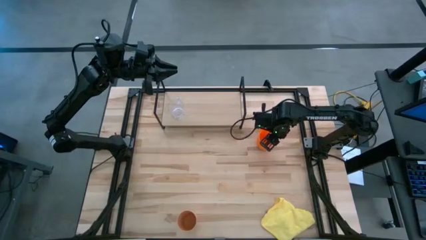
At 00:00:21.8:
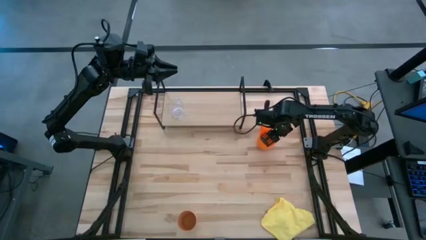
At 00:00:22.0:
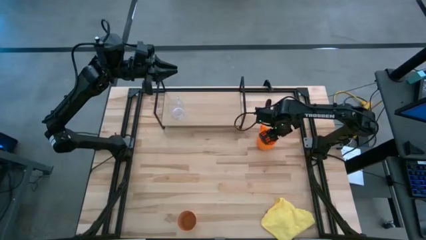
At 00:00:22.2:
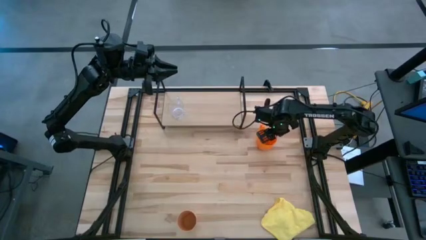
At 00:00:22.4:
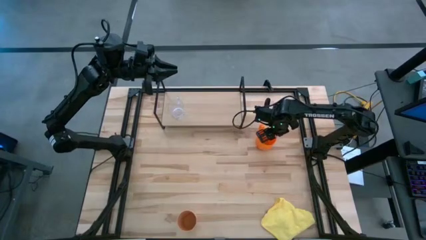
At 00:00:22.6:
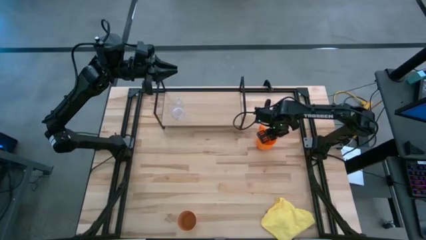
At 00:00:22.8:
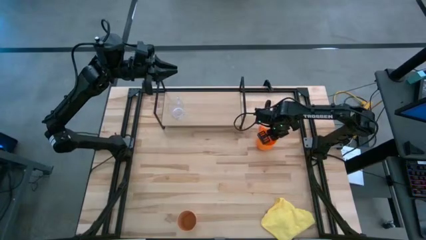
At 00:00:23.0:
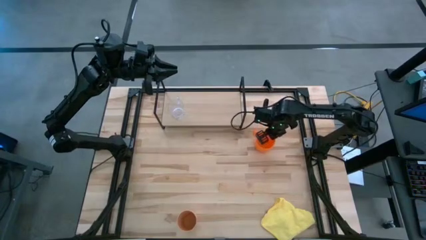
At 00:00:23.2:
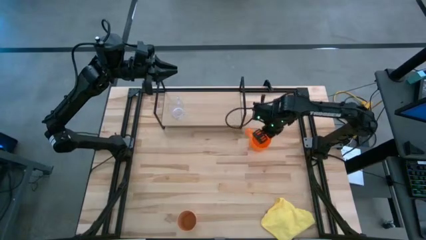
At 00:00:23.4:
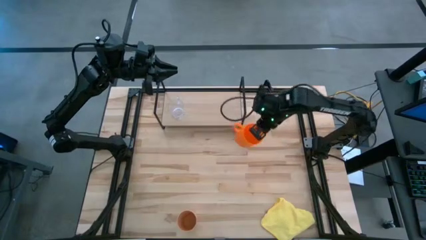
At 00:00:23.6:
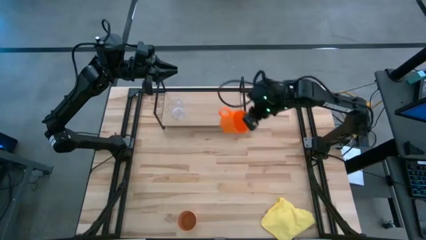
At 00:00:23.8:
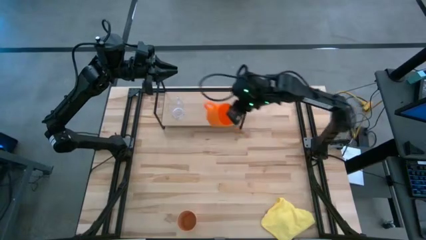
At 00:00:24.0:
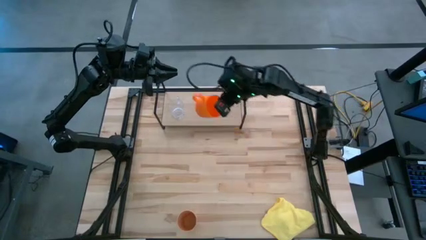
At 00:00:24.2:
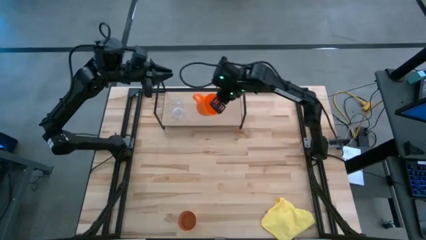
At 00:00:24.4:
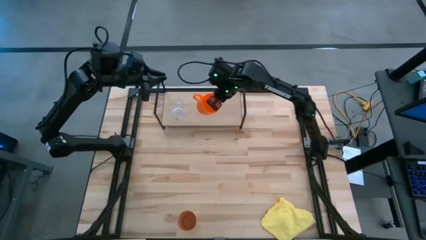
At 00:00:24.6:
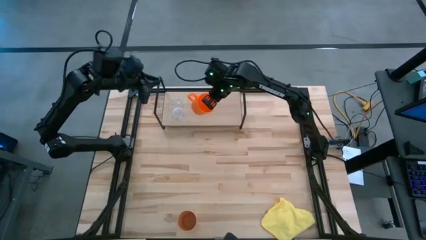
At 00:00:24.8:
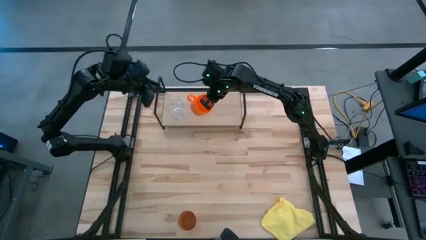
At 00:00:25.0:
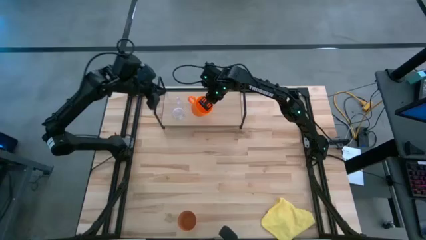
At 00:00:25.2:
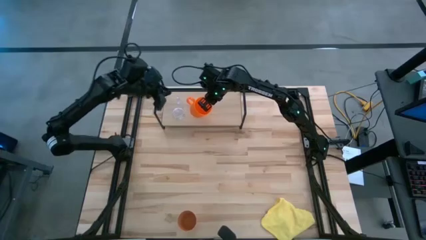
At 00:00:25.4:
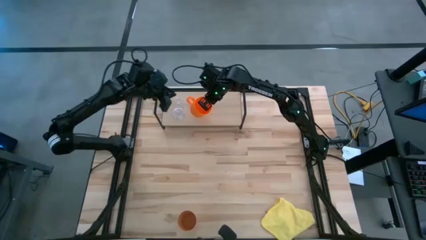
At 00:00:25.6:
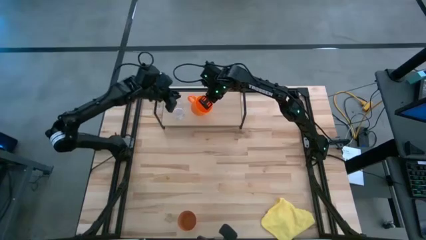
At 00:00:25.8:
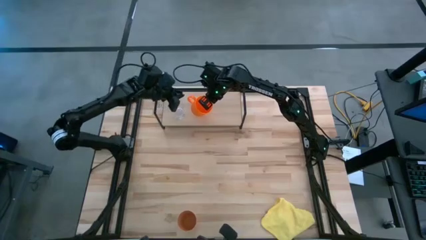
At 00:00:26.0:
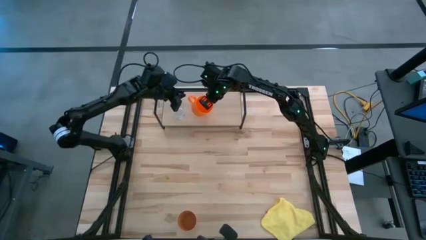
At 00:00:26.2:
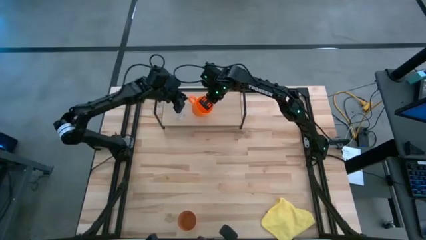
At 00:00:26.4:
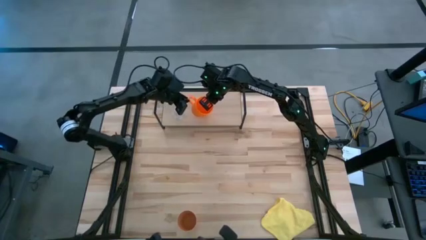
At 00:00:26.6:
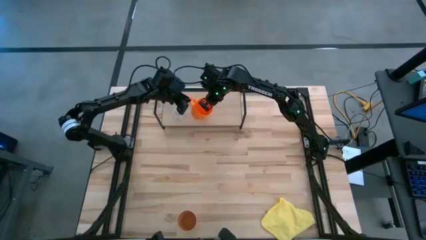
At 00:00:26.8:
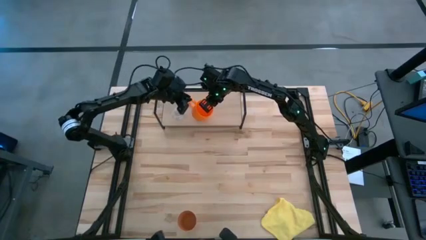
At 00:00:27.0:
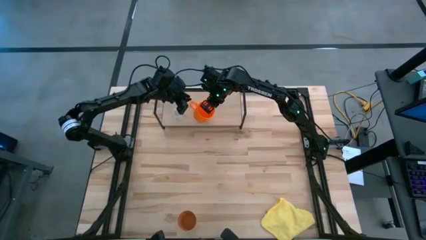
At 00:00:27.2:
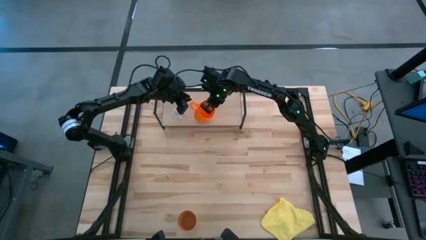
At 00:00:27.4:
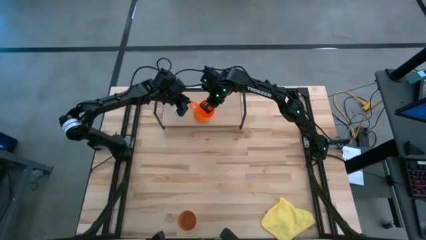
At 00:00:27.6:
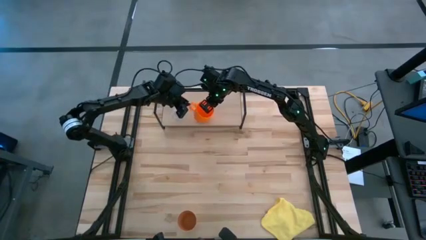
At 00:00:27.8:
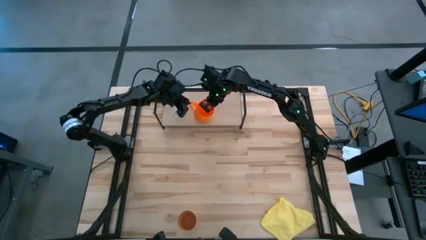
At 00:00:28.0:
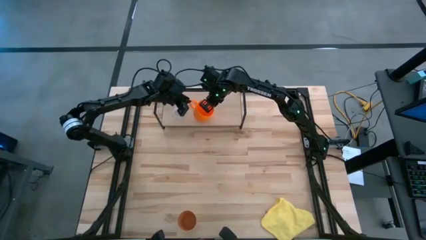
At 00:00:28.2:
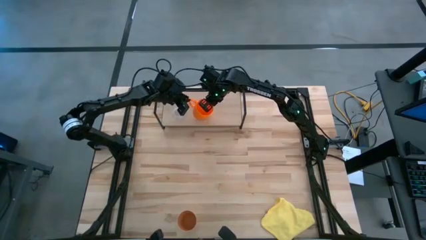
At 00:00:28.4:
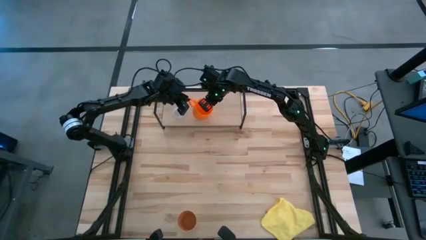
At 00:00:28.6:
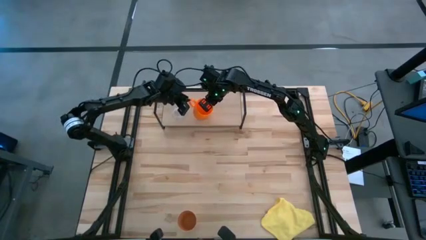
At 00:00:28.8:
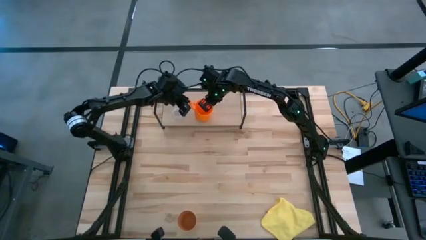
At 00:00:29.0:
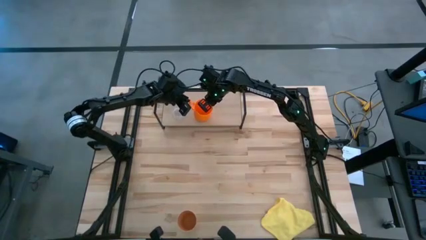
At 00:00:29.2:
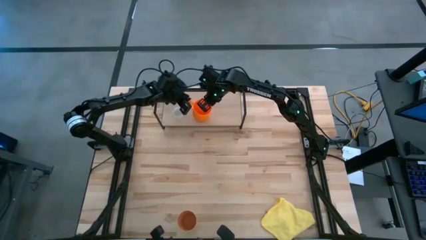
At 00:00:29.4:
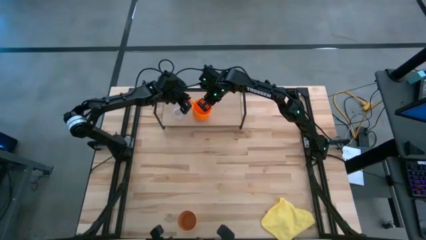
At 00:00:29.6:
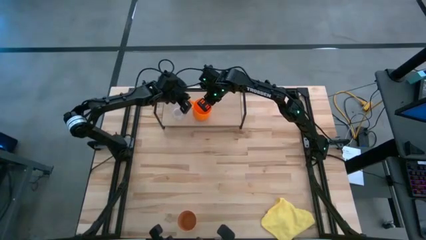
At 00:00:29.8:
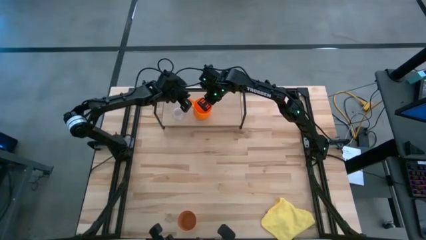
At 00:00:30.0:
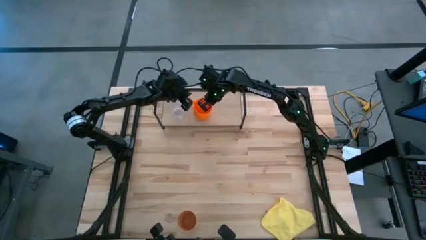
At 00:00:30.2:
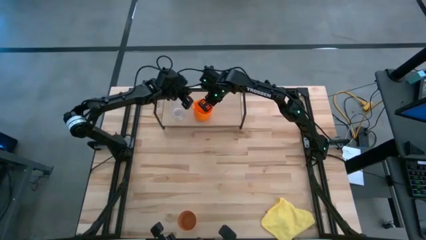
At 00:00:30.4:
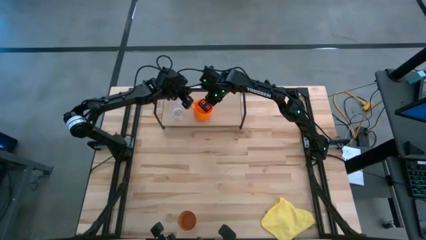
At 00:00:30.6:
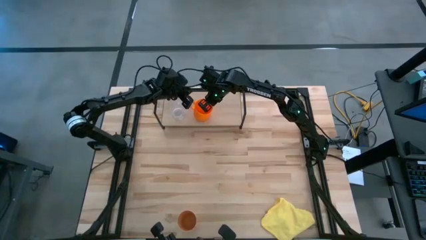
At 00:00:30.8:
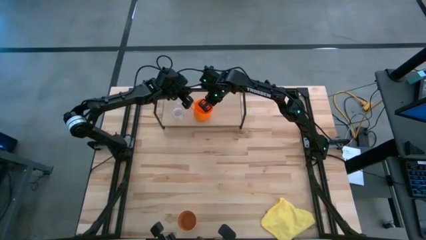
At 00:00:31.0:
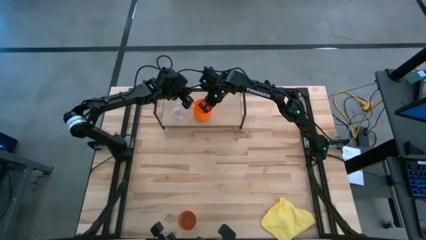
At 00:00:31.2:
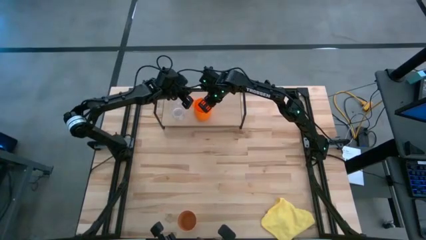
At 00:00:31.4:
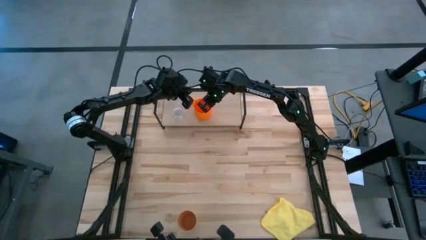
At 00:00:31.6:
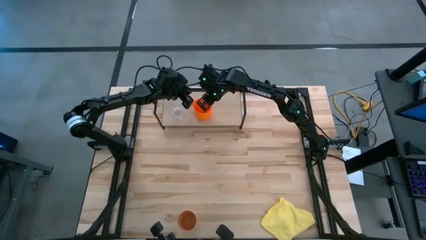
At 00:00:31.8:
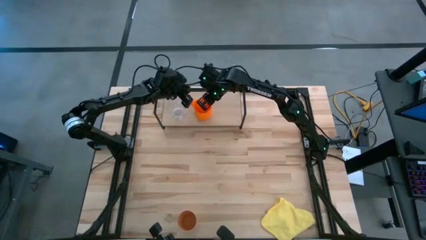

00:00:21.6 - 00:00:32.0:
Task: Stack small to large cups/mugs on shelf
Put the orange mug on the shelf

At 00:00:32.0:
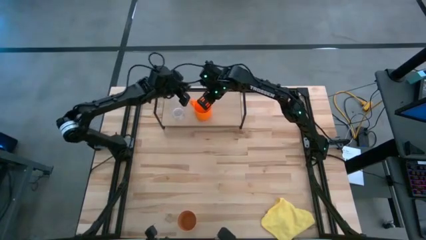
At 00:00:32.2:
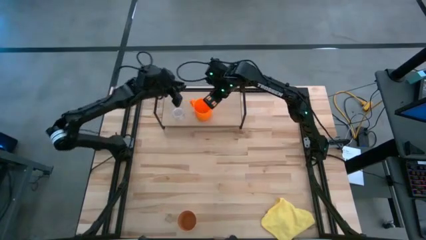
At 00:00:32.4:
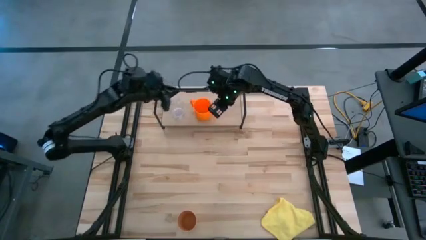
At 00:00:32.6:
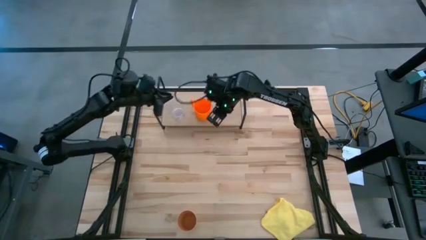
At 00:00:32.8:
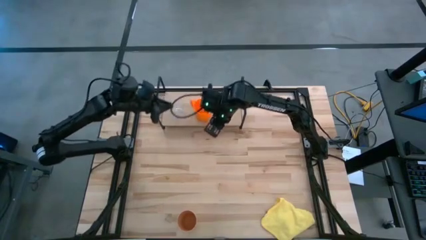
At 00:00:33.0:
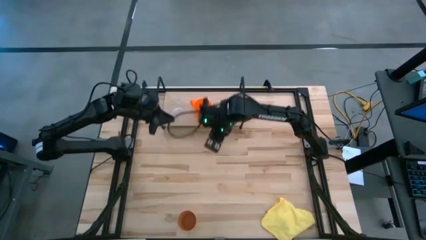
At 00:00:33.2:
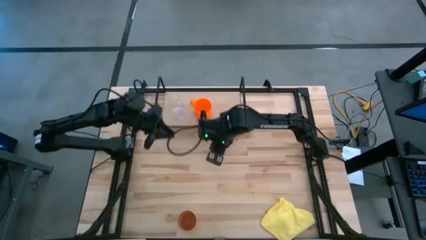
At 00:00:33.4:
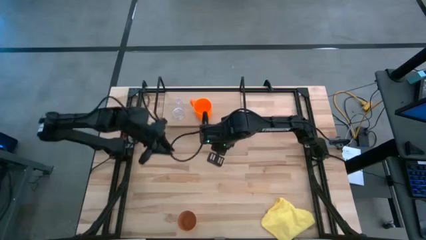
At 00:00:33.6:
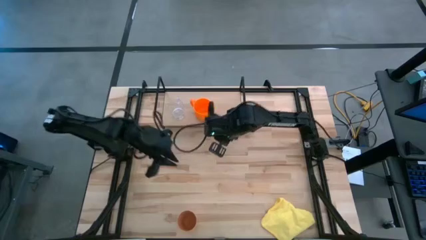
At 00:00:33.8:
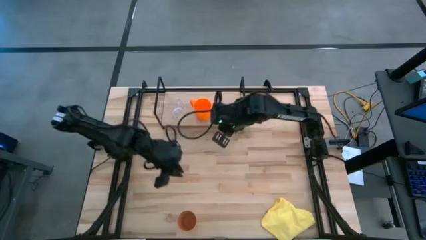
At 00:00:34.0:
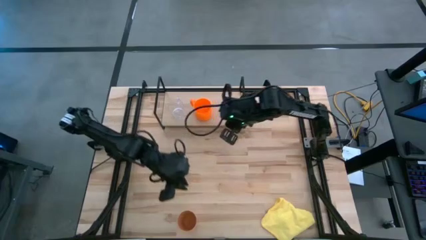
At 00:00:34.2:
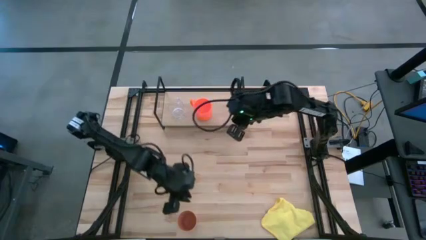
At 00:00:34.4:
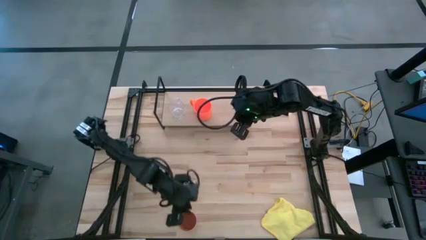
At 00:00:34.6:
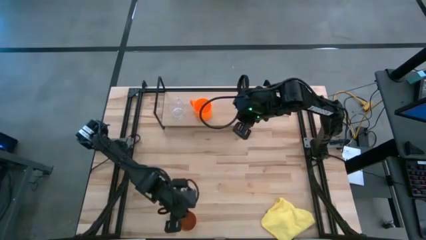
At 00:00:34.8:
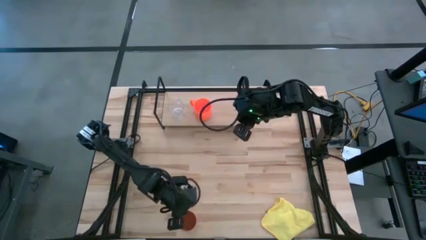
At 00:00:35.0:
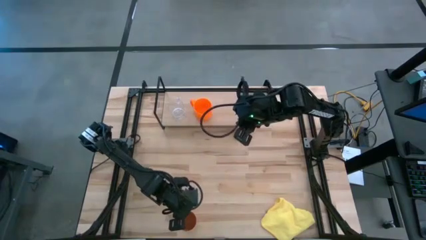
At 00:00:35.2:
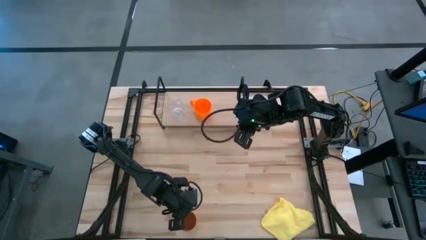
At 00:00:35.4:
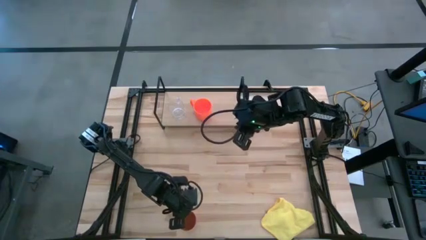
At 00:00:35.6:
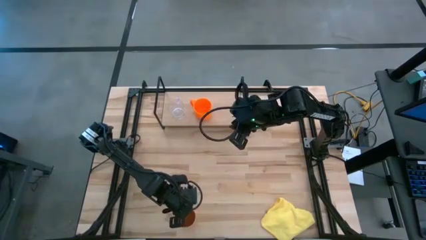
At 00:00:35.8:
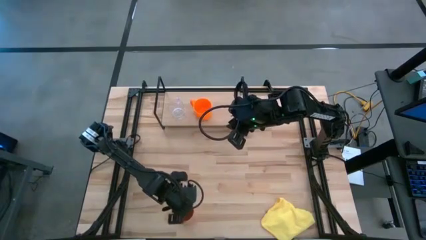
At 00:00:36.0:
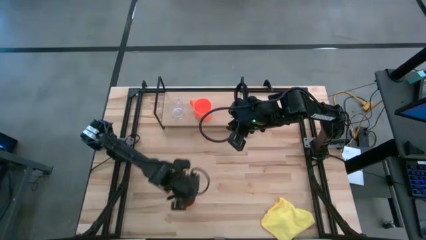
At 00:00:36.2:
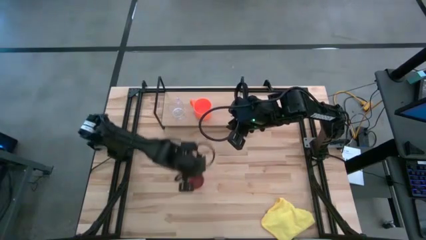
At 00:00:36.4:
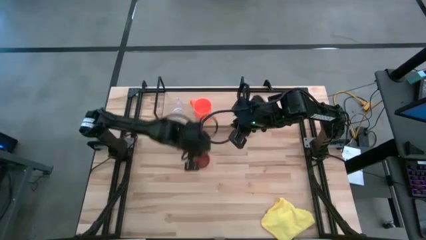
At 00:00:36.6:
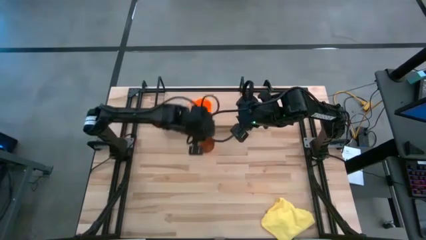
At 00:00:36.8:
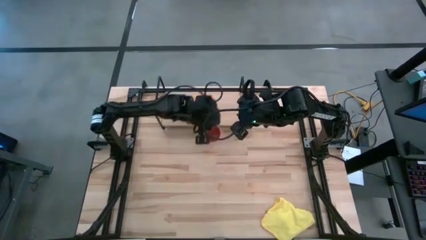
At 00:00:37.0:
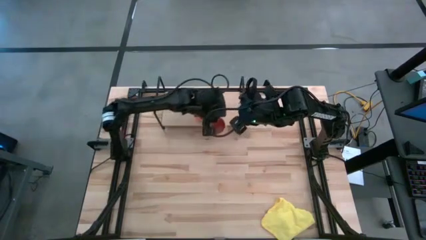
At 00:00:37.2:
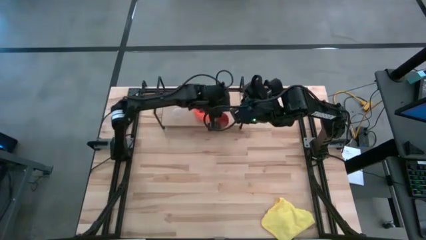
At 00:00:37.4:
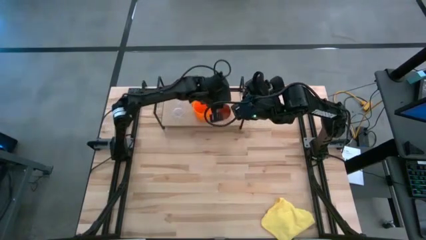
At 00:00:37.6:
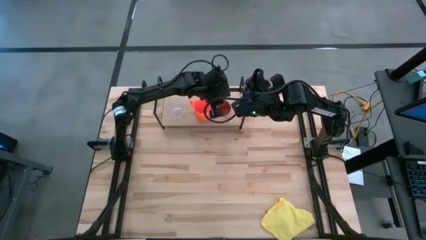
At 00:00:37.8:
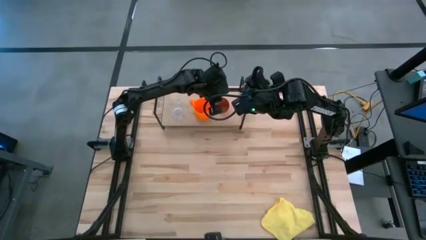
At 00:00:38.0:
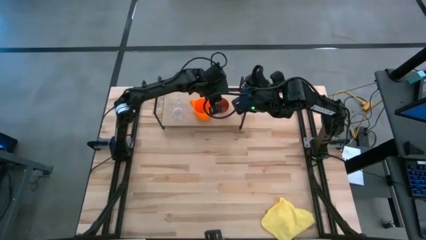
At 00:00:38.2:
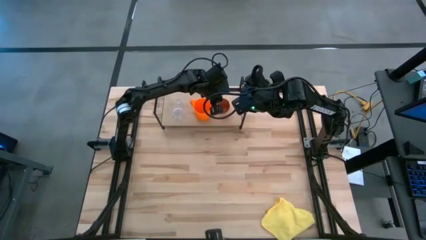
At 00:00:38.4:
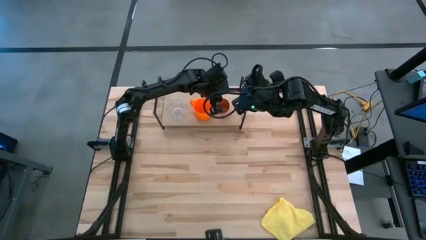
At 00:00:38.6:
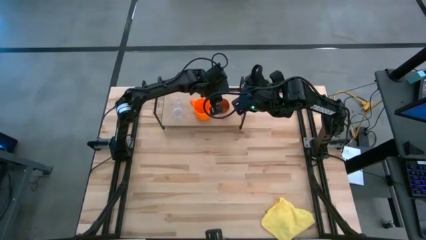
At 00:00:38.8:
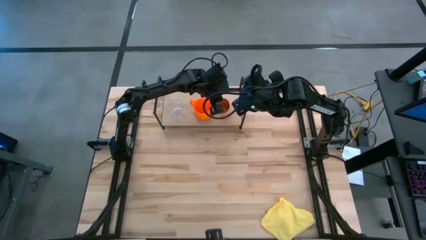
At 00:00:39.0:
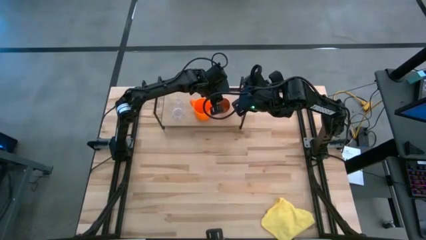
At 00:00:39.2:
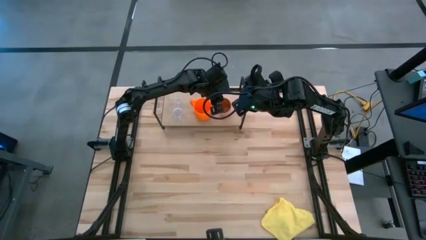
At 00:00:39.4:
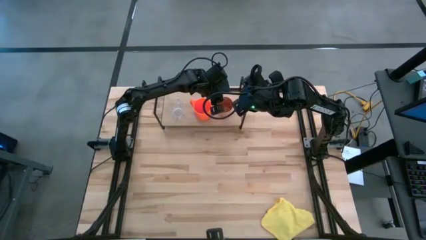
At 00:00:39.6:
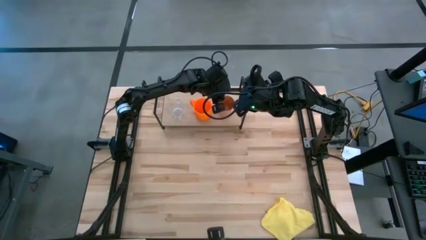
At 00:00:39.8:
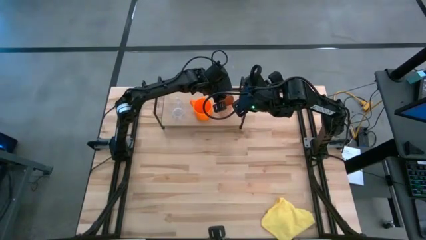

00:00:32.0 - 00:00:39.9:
Put the light orange cup on the shelf
